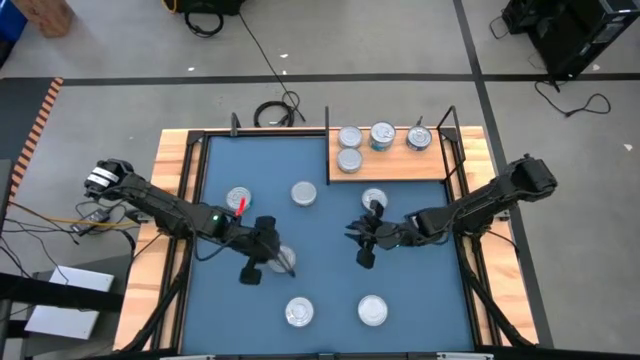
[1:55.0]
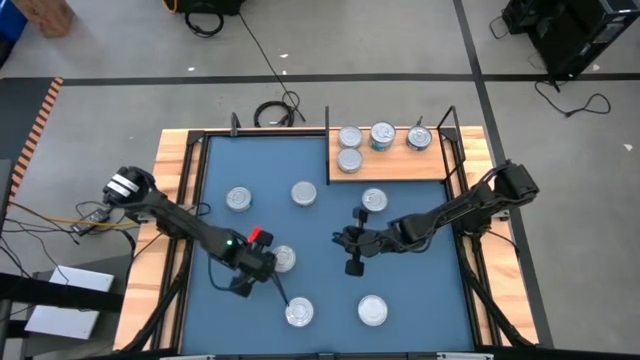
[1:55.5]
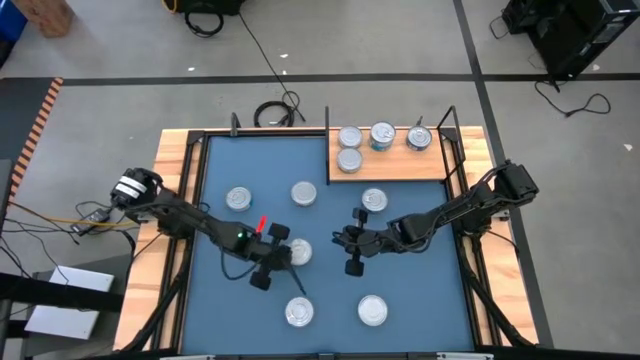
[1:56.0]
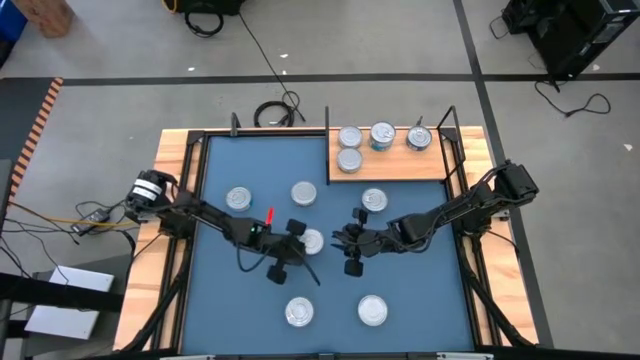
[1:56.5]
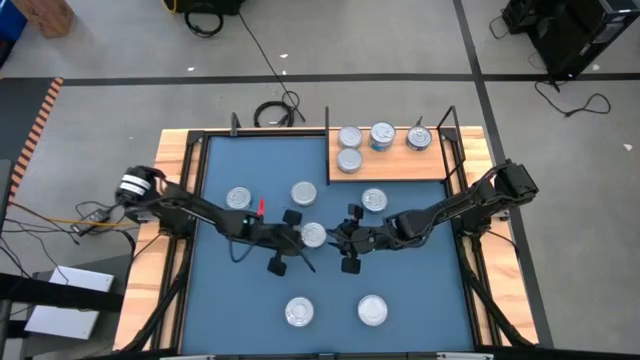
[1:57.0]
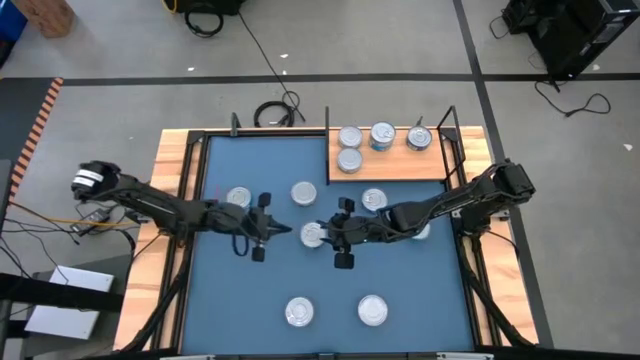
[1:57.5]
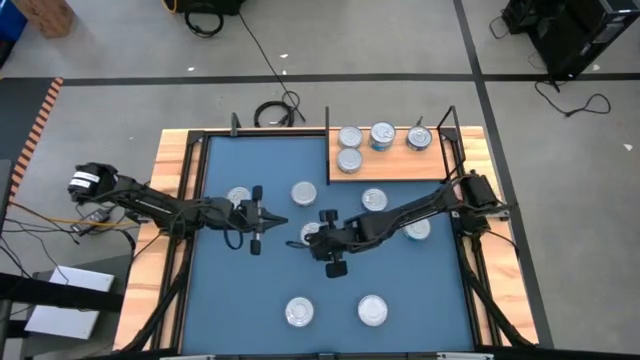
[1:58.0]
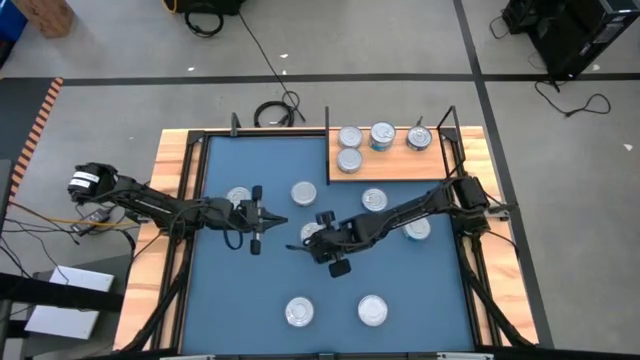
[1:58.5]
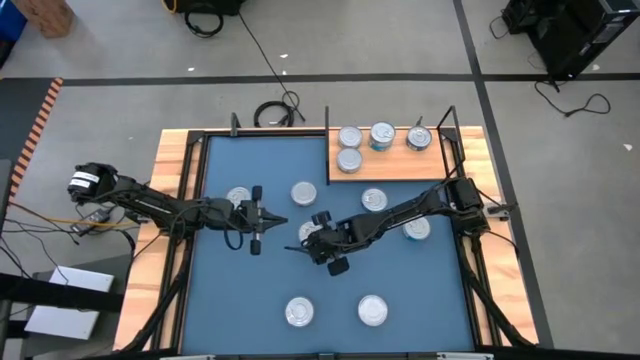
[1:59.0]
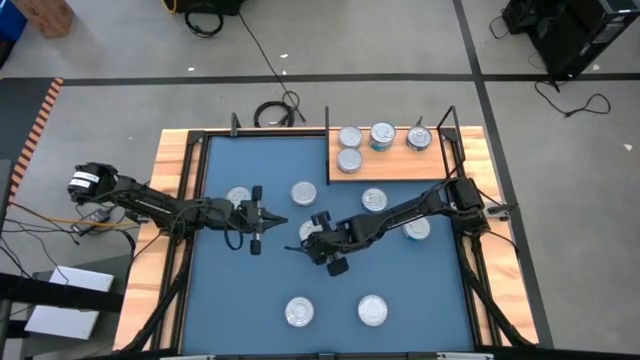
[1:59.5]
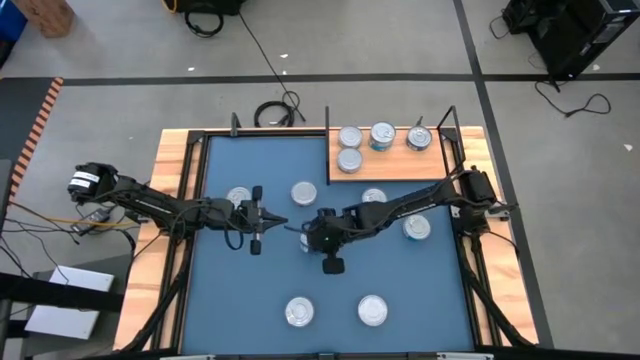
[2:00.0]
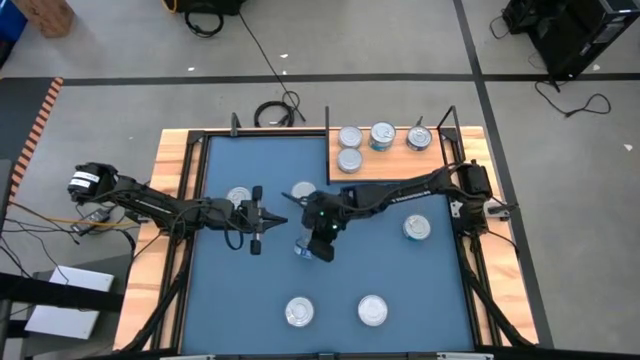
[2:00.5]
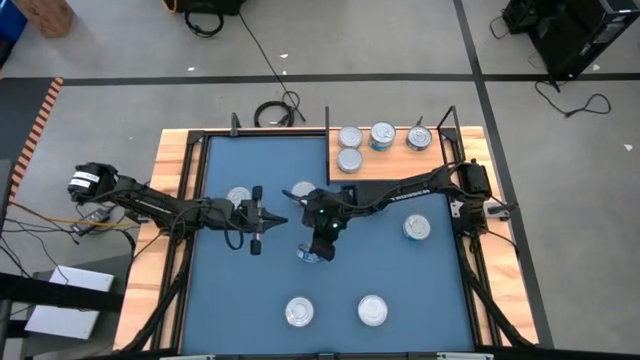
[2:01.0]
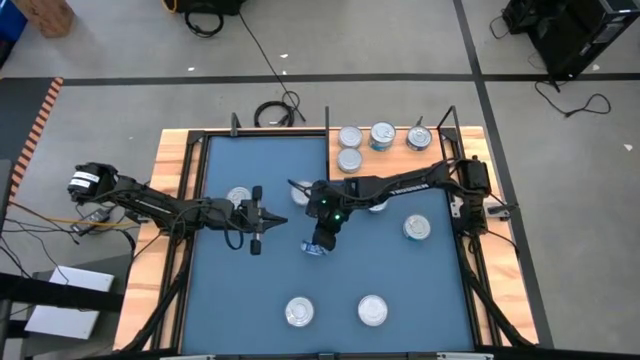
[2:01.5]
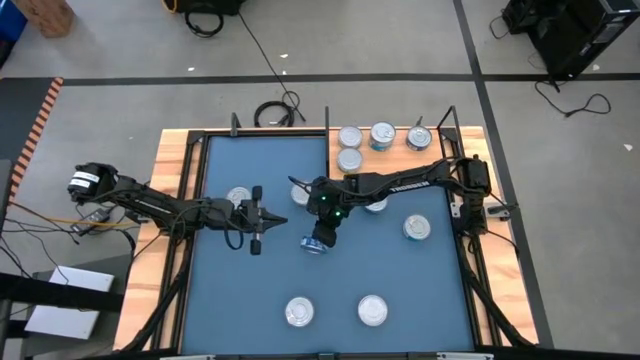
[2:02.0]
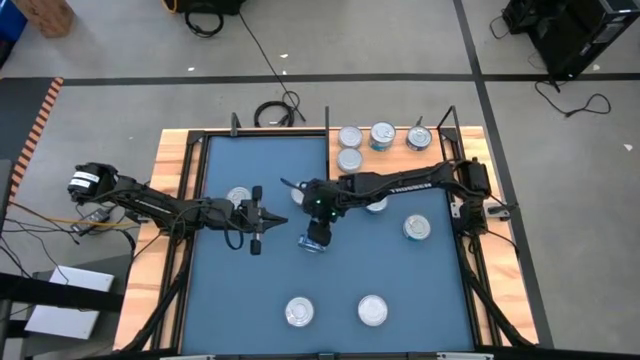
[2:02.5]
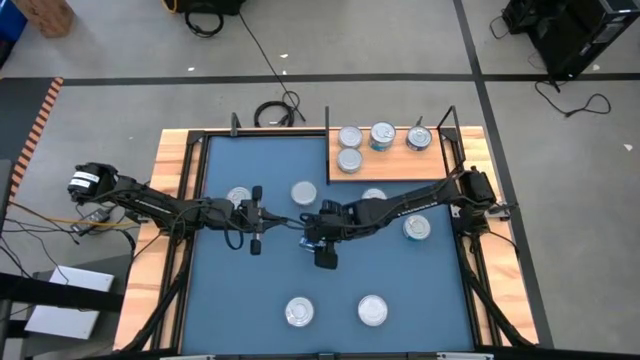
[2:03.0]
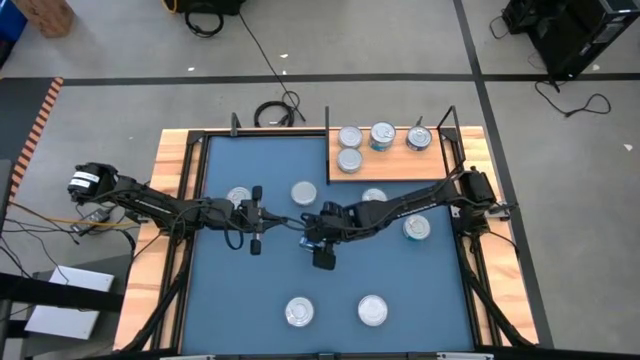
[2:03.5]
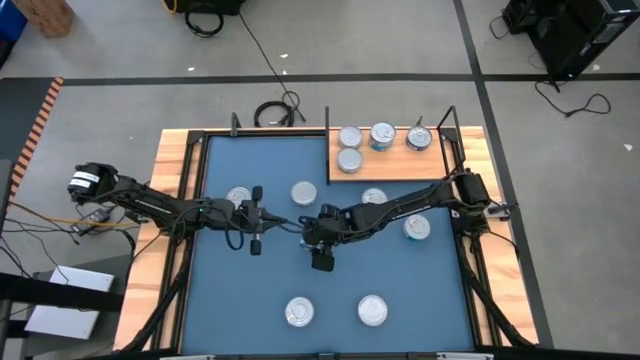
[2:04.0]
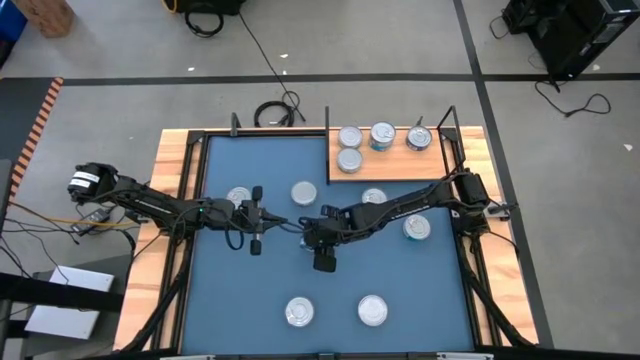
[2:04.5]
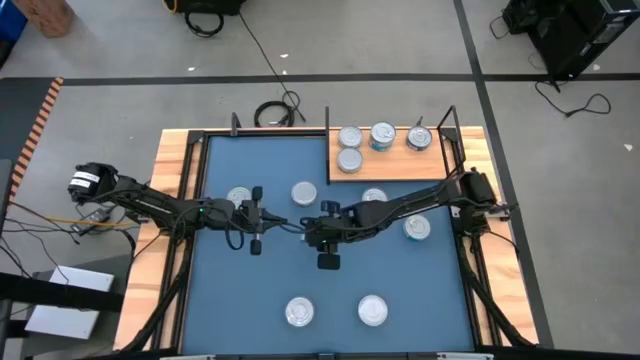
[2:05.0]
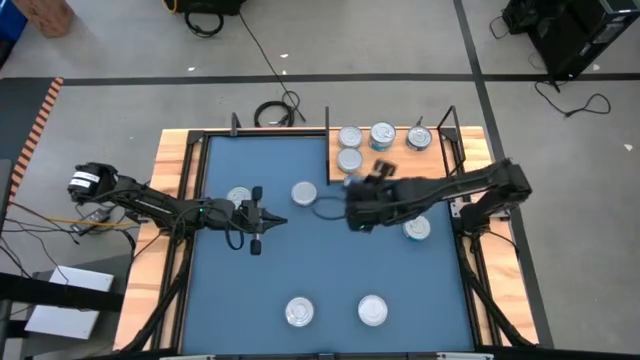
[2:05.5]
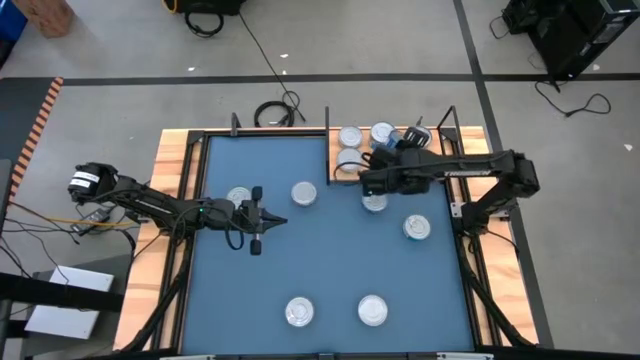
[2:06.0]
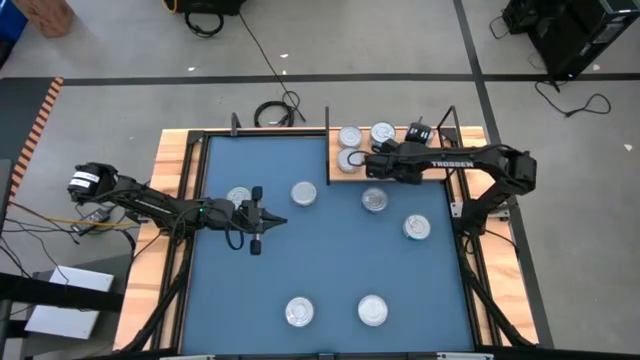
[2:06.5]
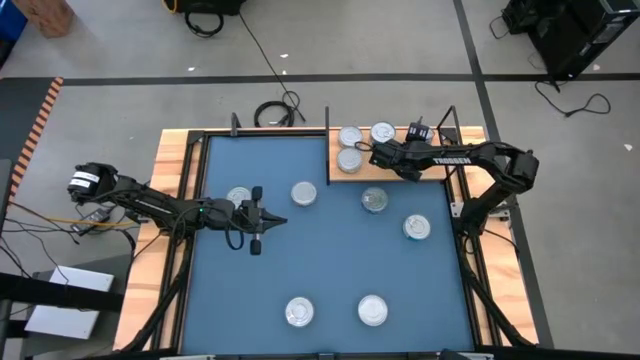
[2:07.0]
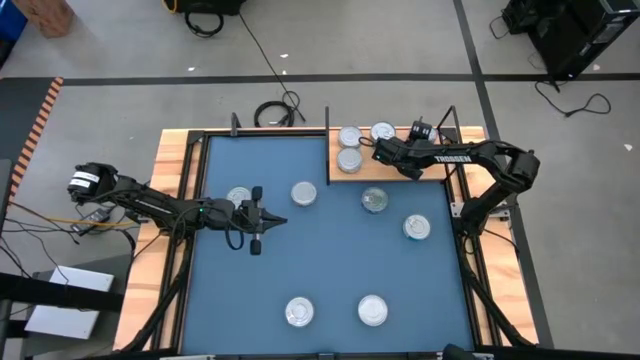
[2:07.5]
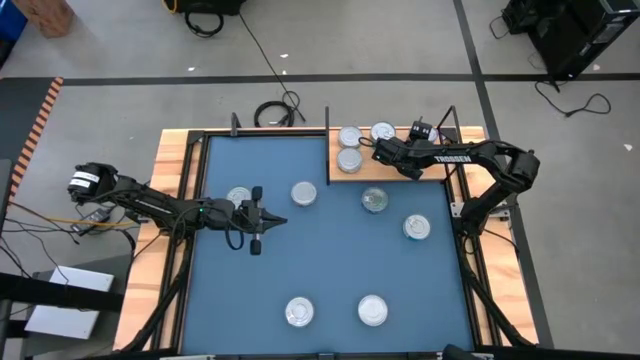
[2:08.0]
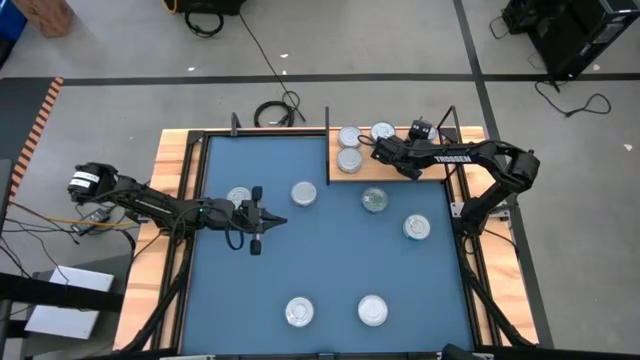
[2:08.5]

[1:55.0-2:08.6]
Task: Stack canned seafood by type on shelf
Stack the left blue tuna can on to the blue tuna can on the shelf

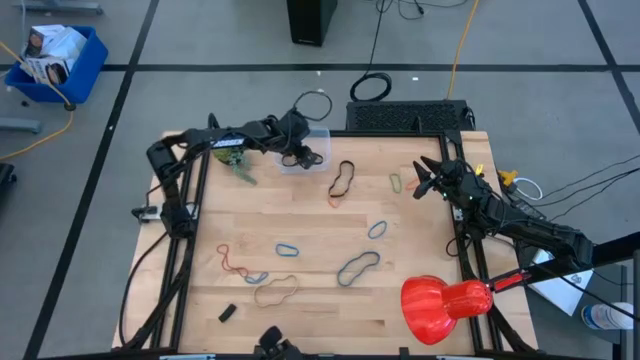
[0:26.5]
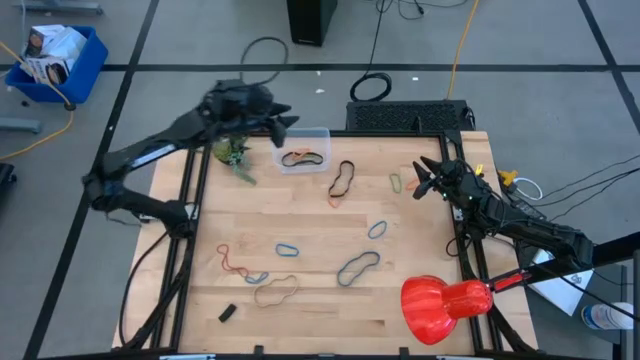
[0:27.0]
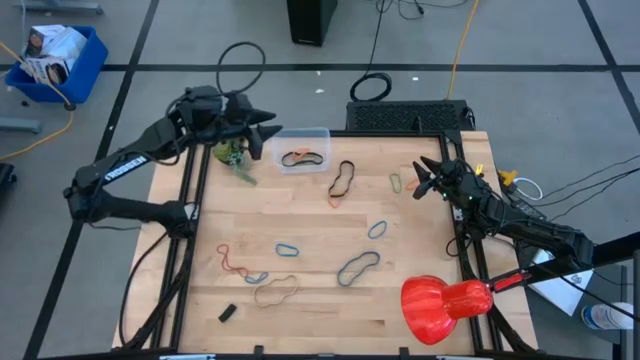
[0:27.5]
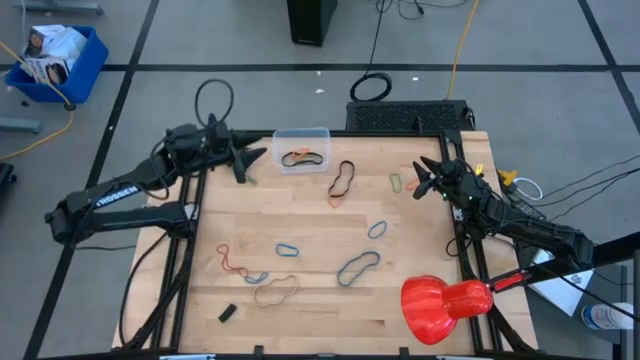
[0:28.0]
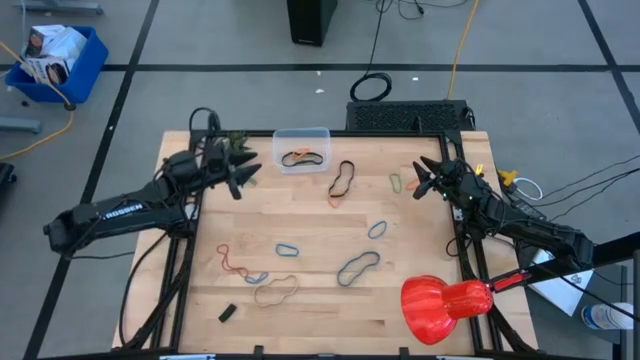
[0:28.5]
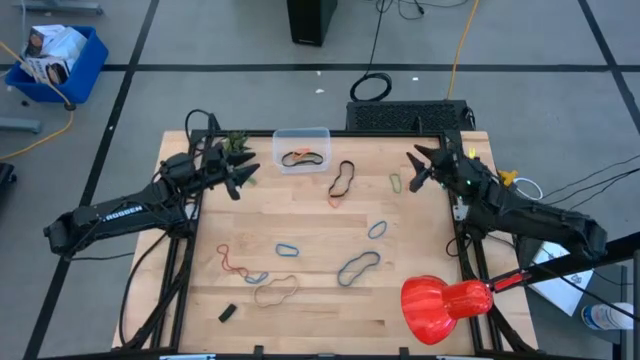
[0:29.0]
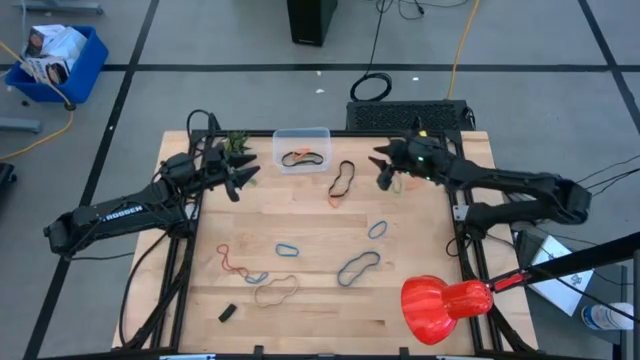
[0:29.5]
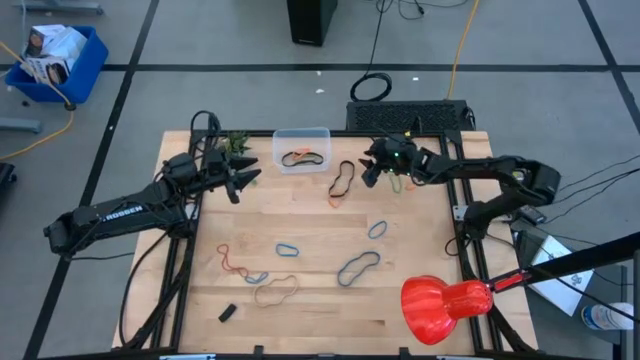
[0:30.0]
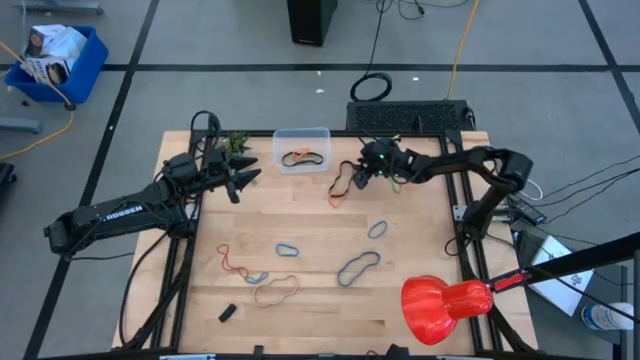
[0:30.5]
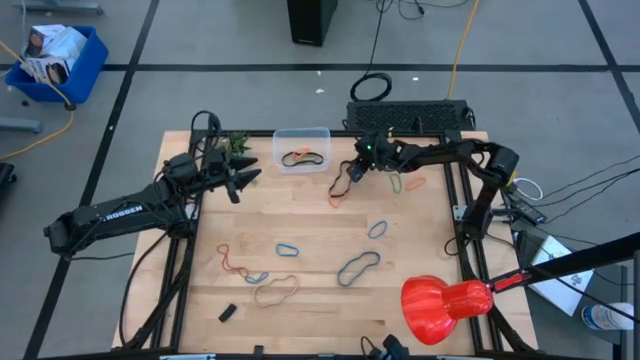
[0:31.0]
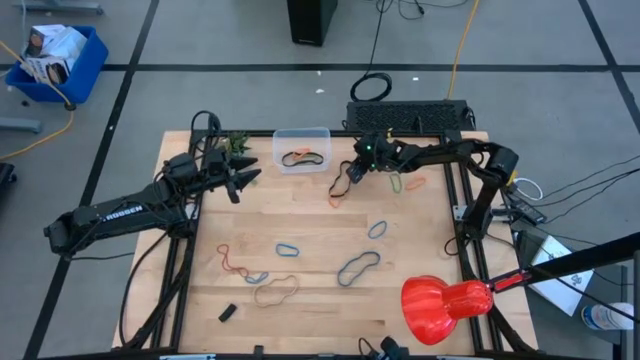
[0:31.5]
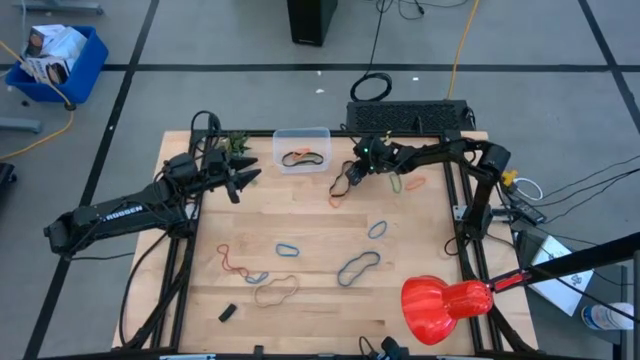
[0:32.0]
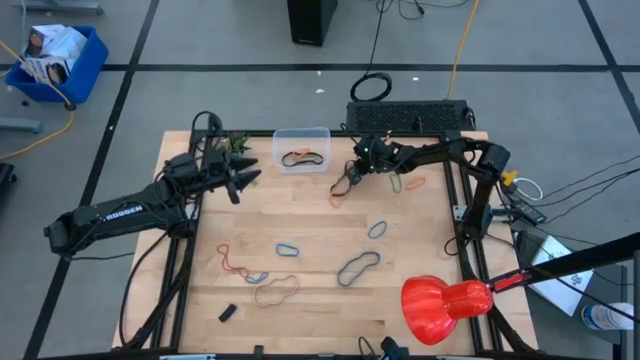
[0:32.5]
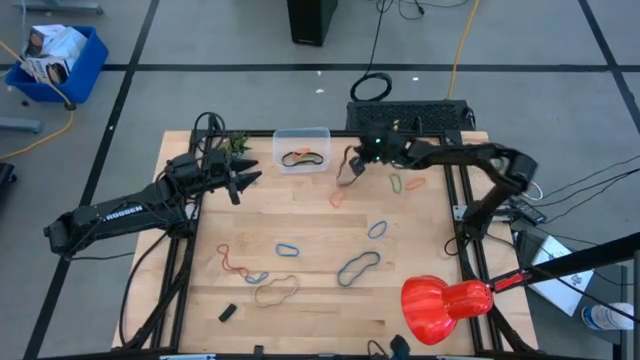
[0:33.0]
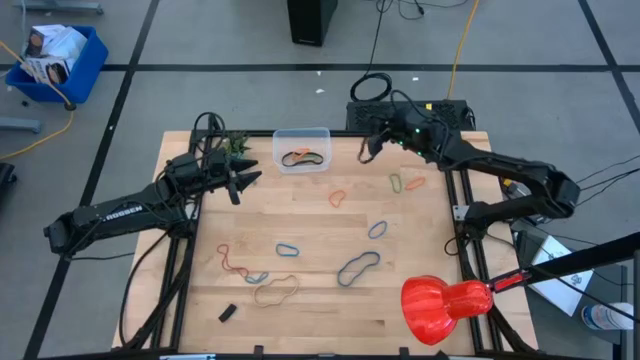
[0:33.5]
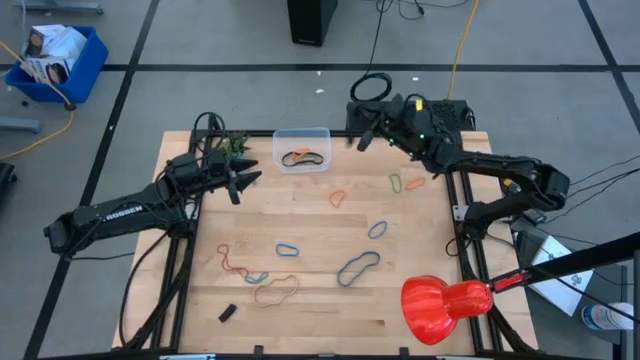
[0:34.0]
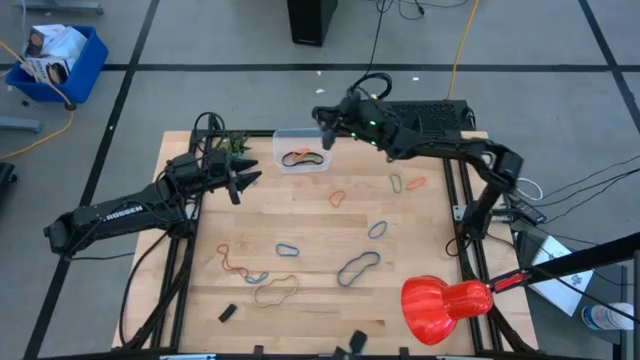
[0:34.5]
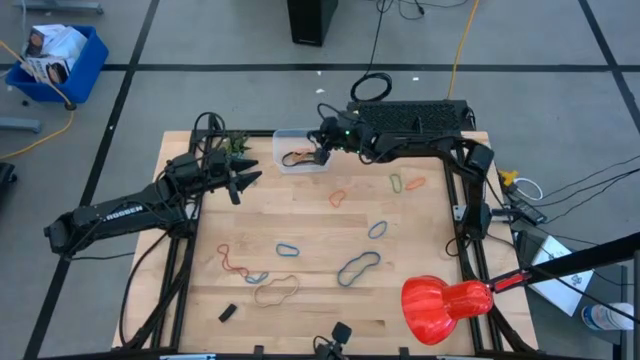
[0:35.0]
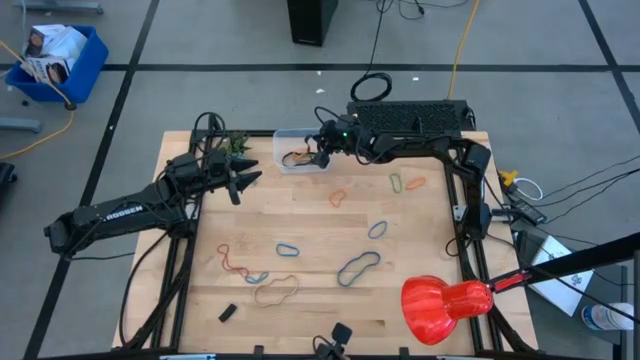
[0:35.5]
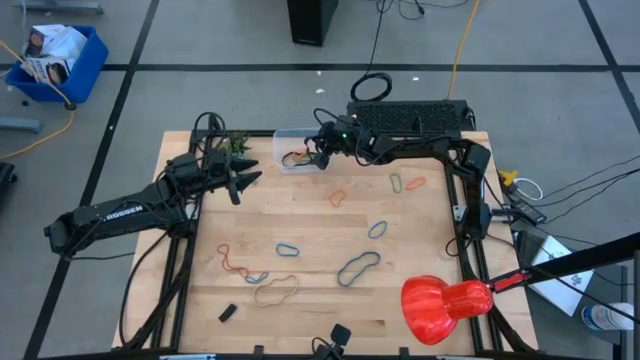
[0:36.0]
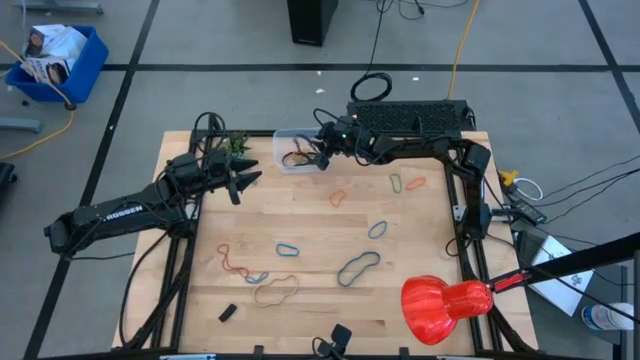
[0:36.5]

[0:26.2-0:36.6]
Task: Pick and place rubber bands into bin
Put the black rubber band into the transparent bin
